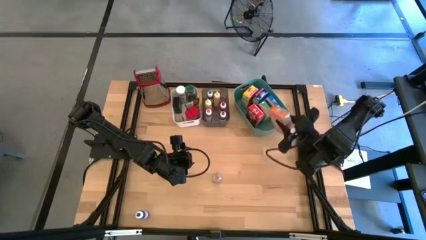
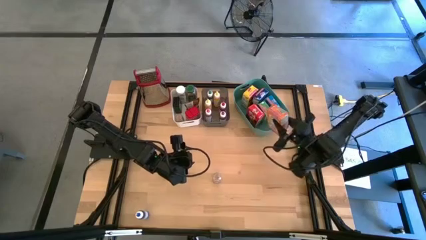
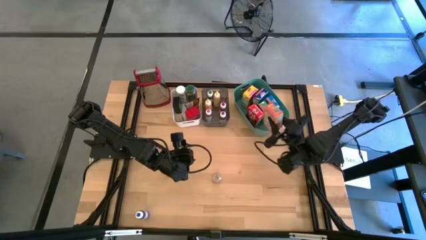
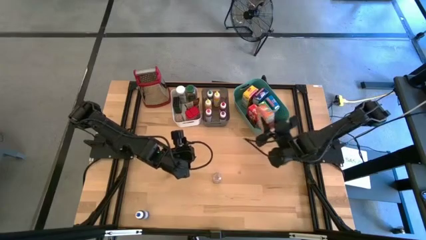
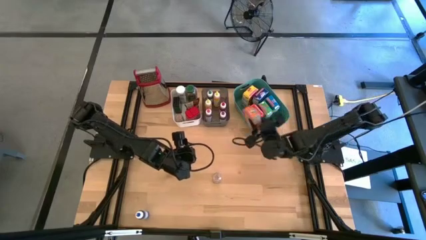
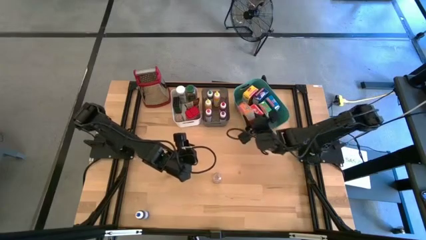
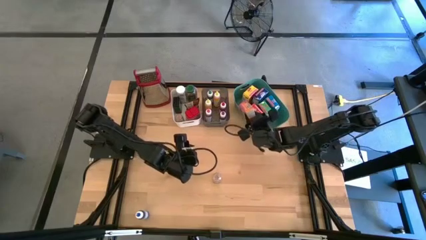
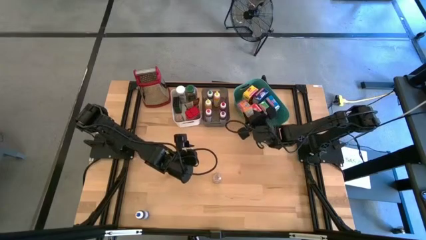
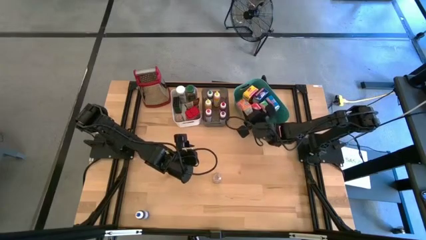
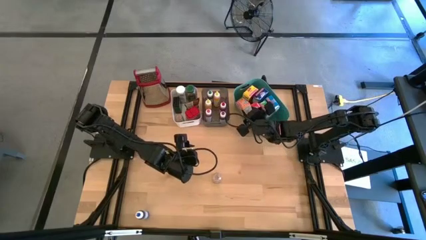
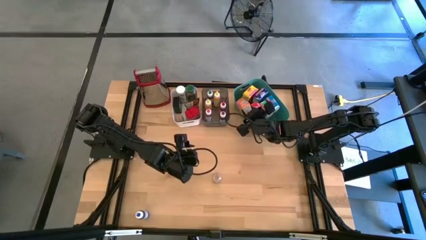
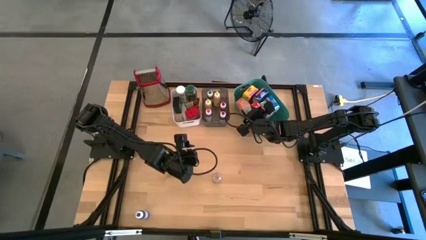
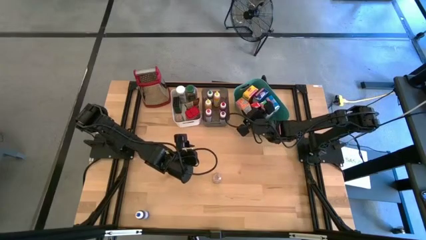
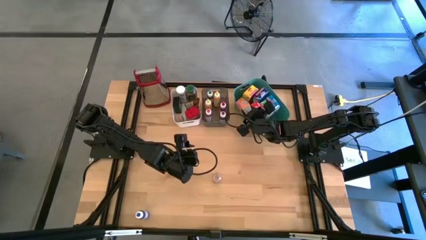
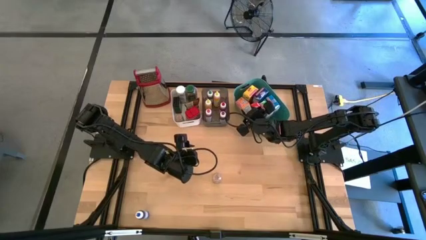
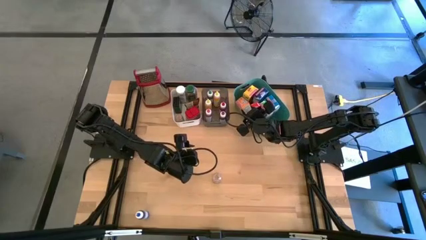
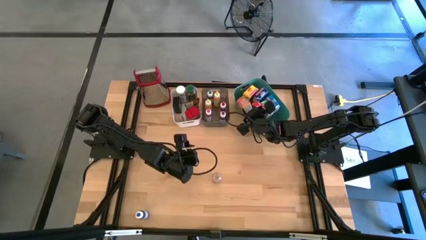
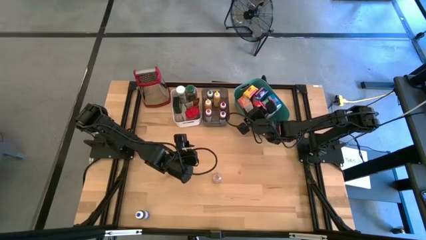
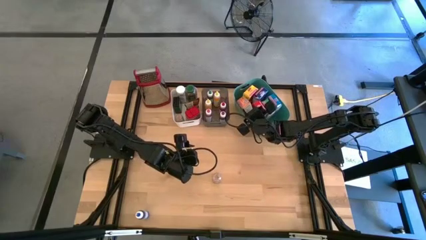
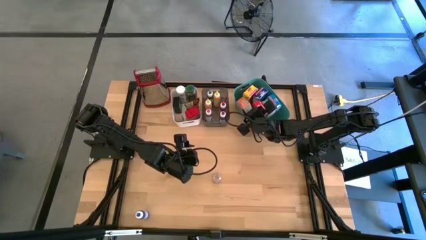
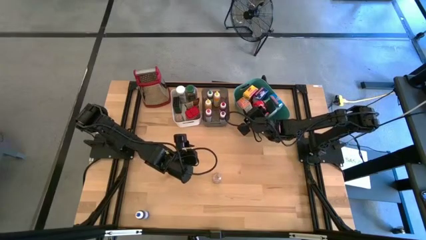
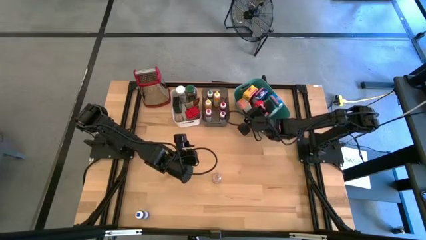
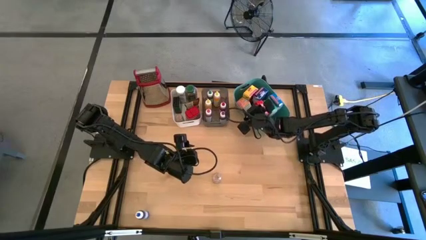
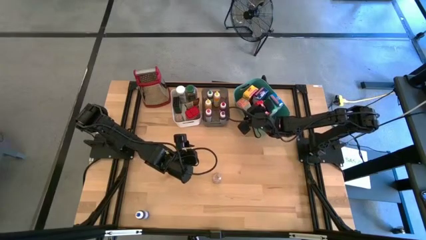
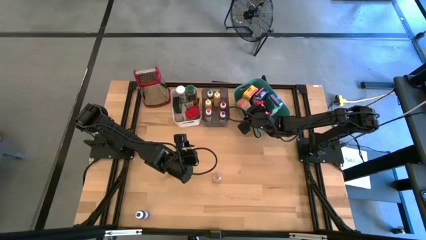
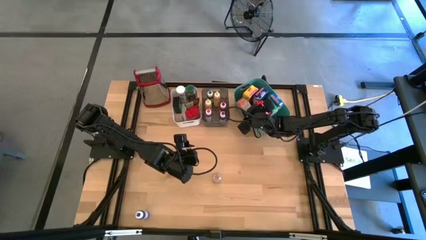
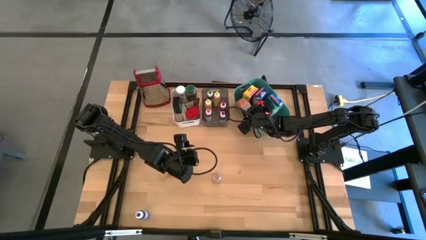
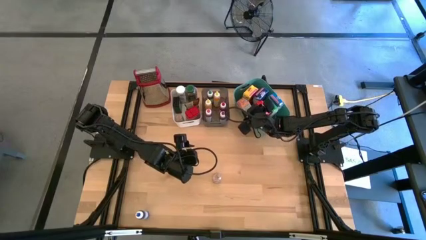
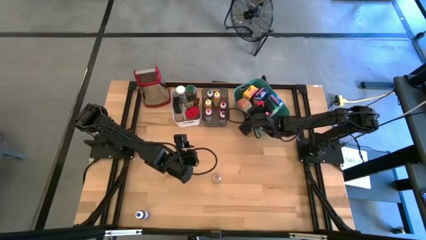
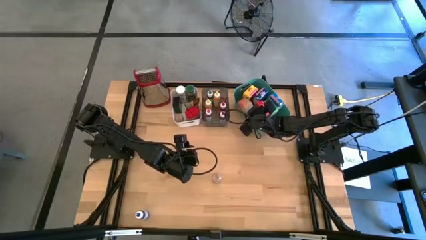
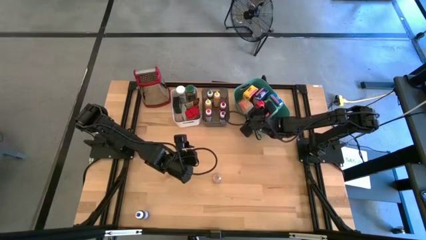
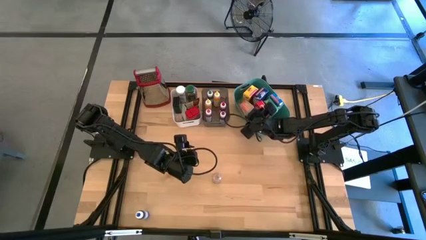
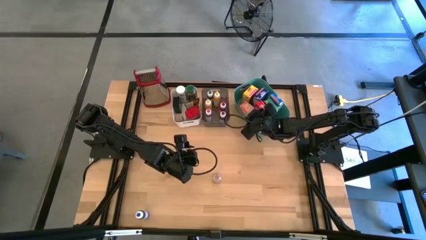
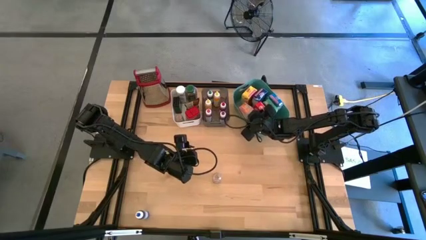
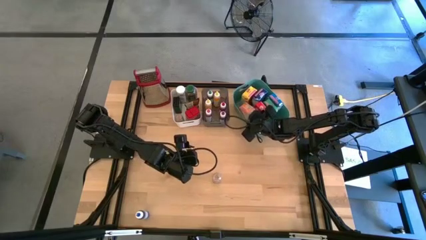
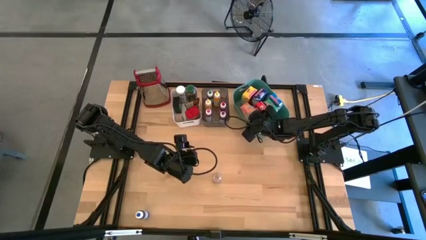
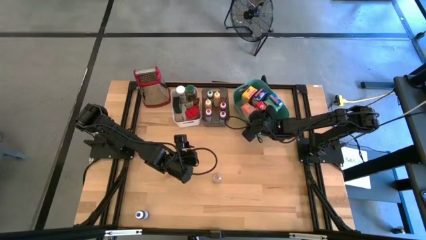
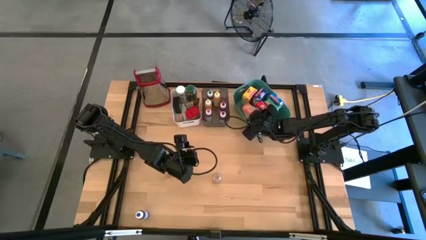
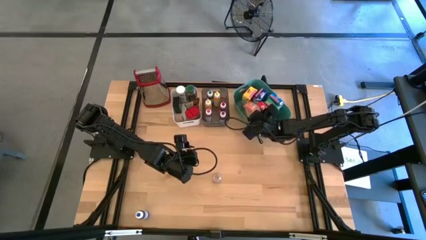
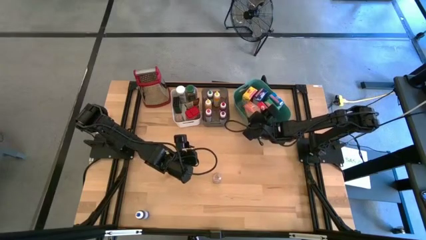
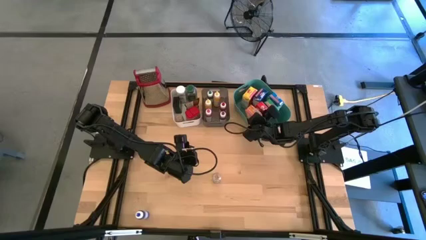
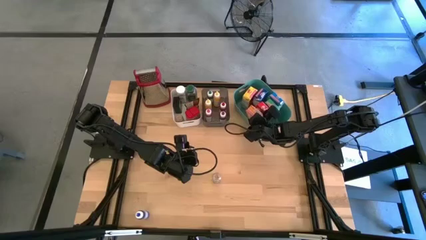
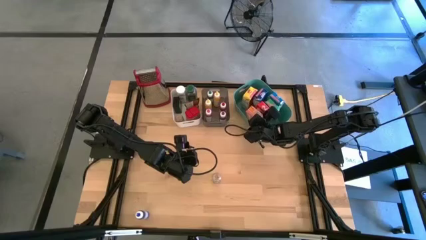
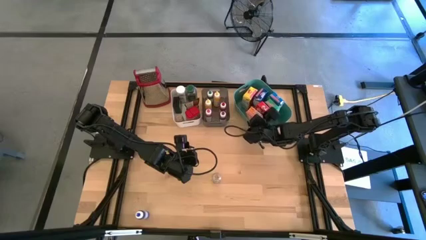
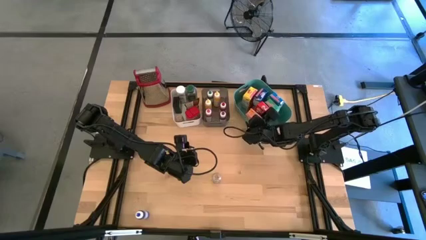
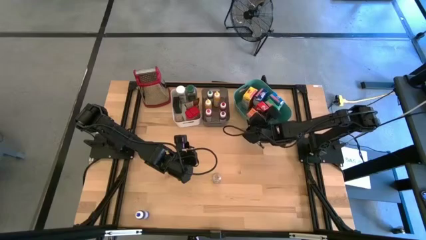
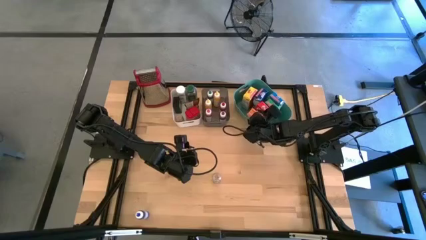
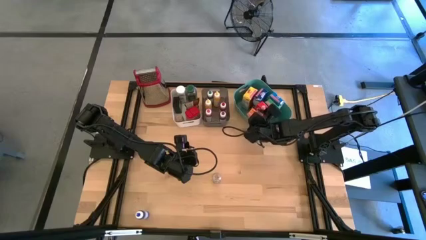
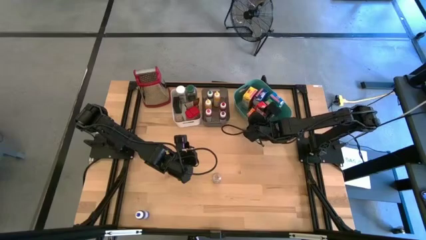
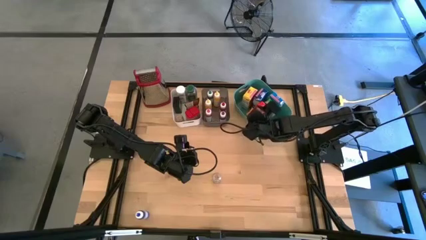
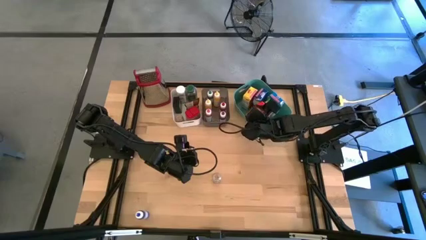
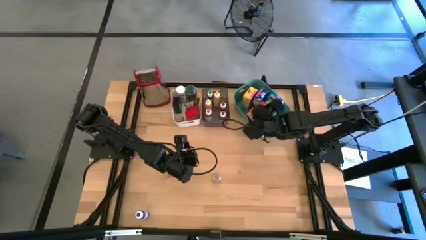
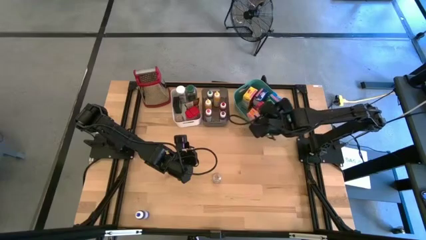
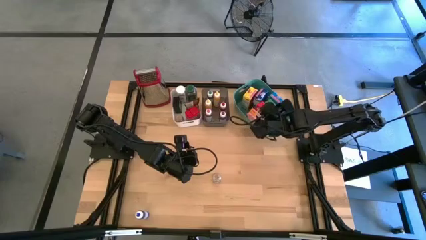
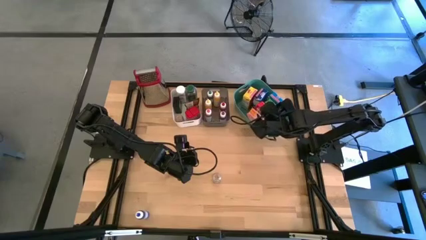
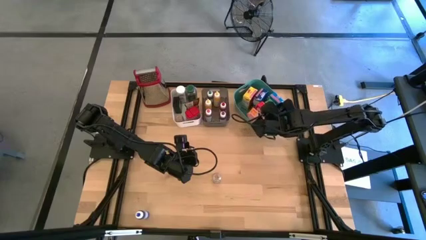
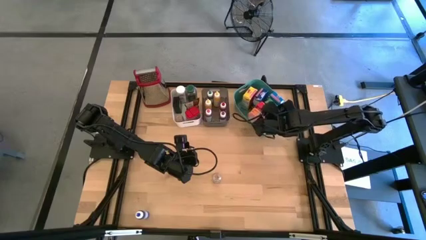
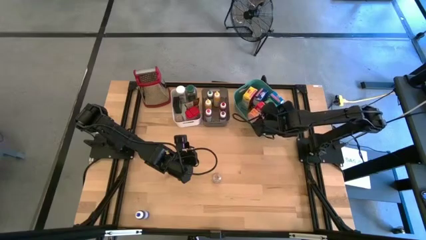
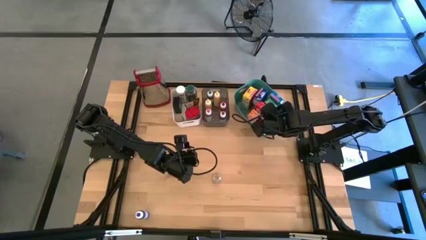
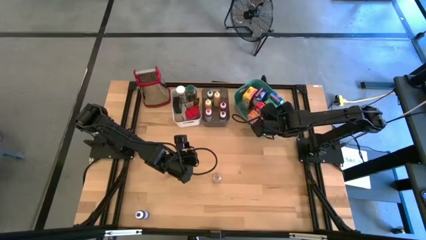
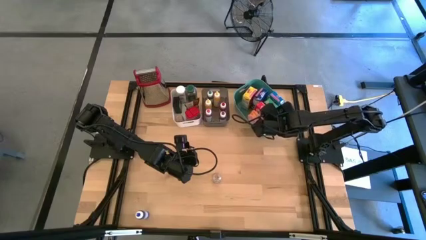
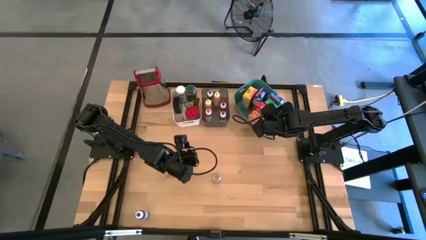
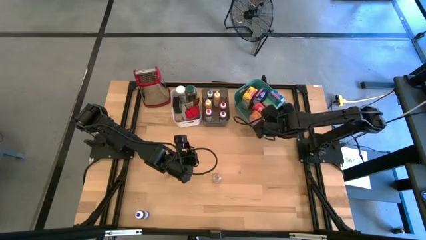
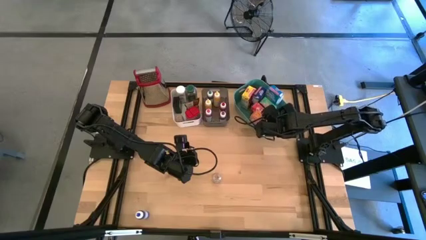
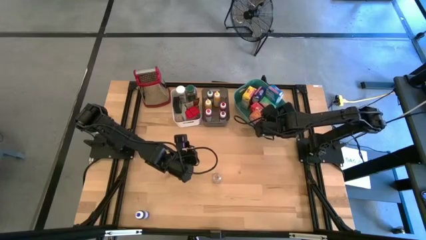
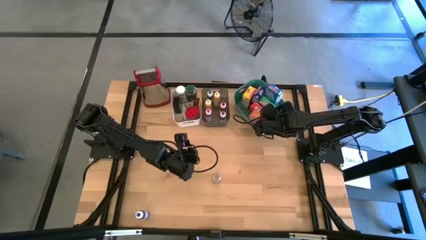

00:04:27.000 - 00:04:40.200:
Task: Pick & Place Kitchen Items
Put the orange cereal box into the right green bin

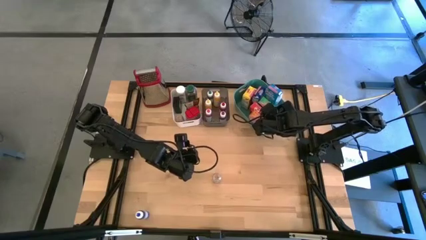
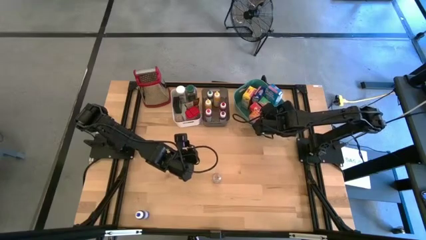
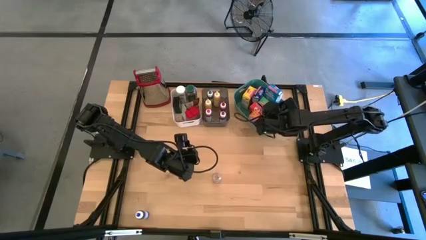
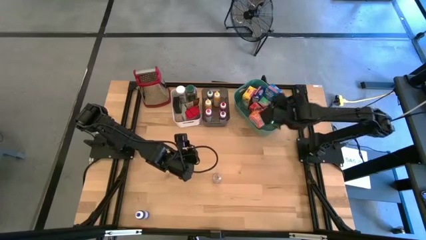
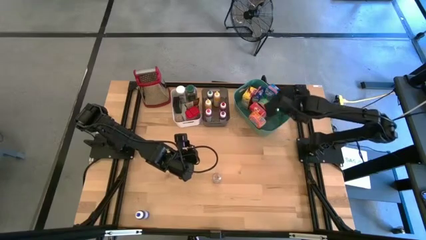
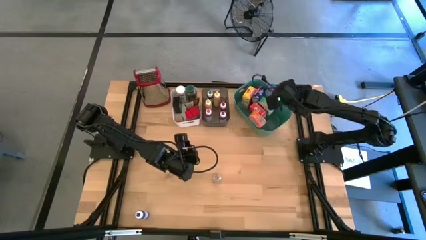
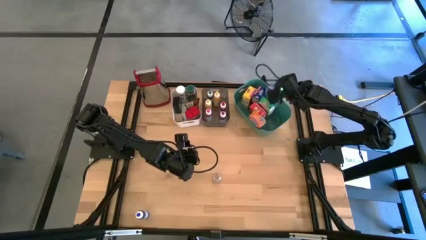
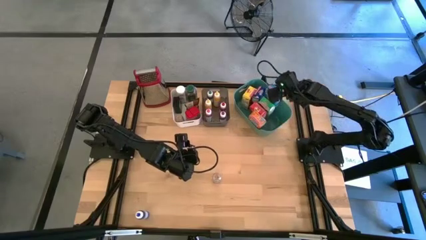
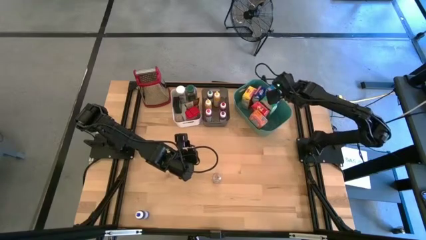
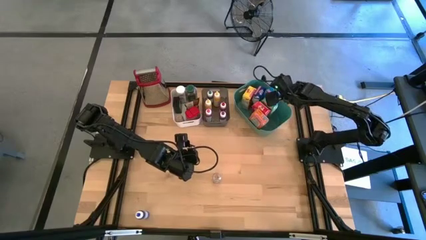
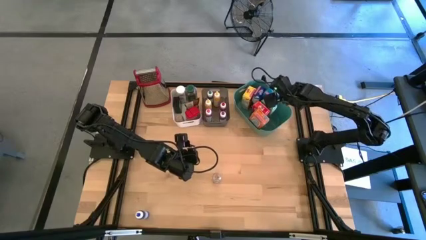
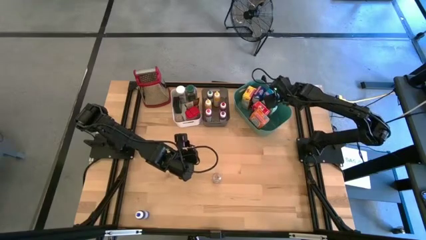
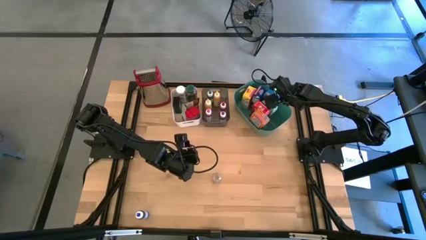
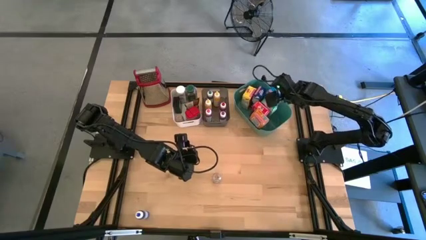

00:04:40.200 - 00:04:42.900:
Adjust the blue cereal box into the right green bin
